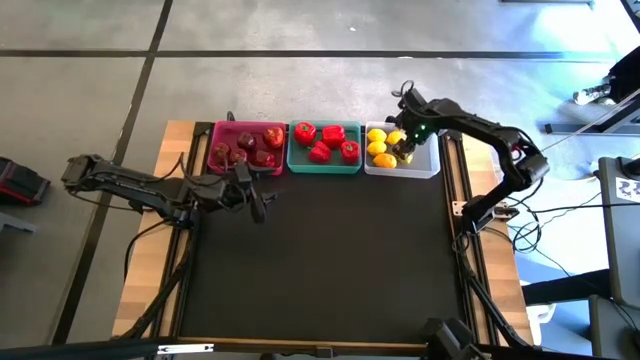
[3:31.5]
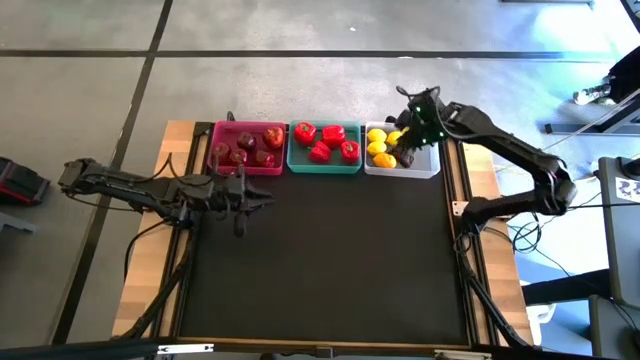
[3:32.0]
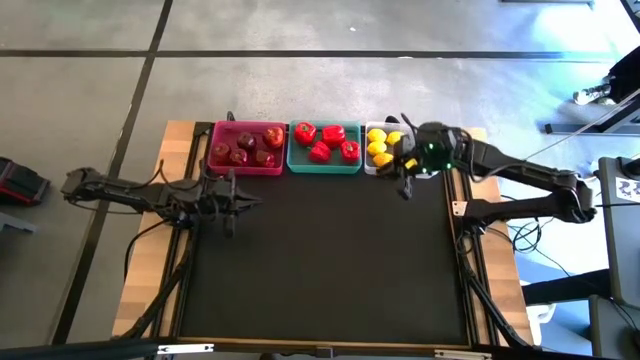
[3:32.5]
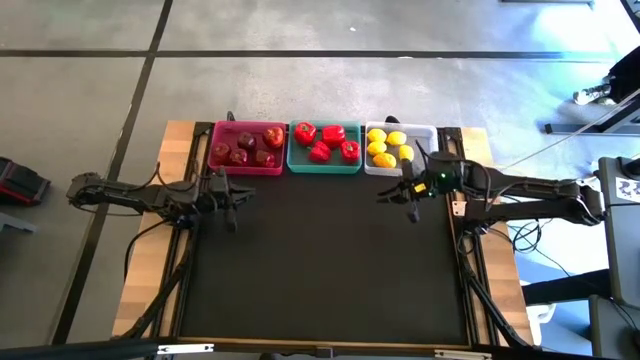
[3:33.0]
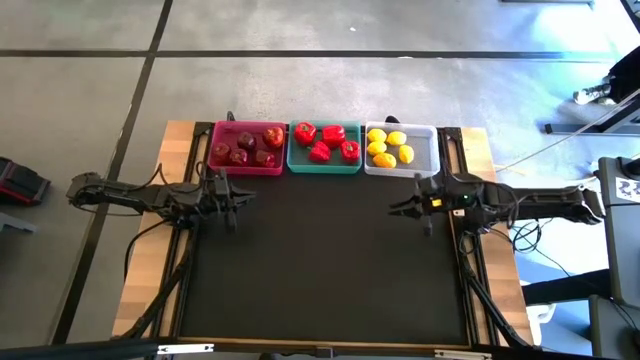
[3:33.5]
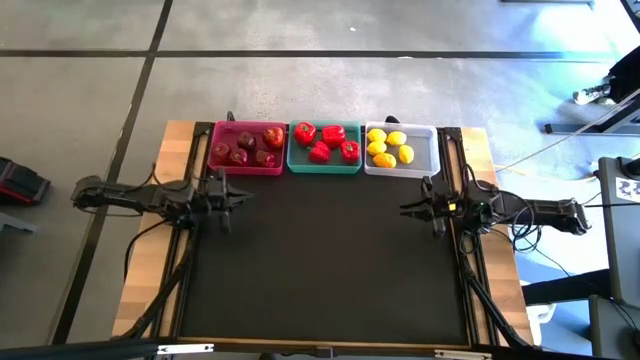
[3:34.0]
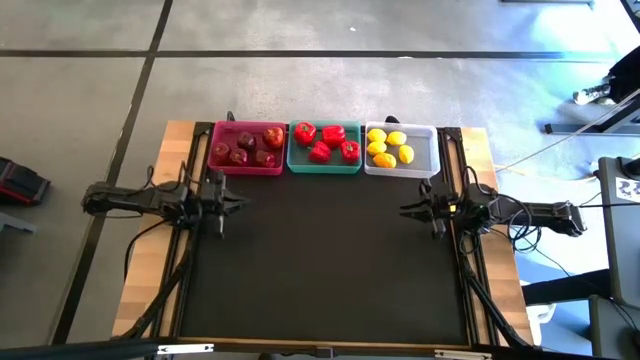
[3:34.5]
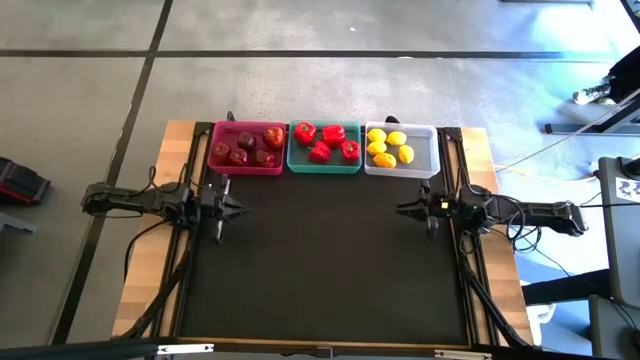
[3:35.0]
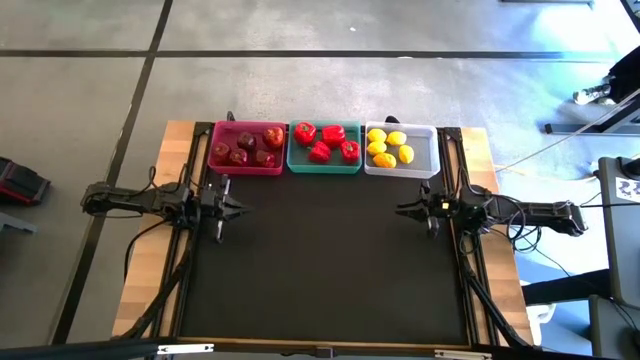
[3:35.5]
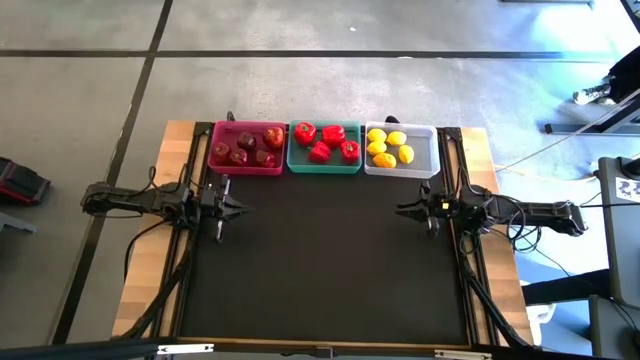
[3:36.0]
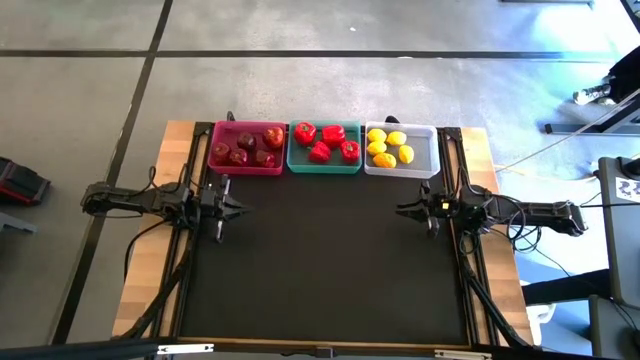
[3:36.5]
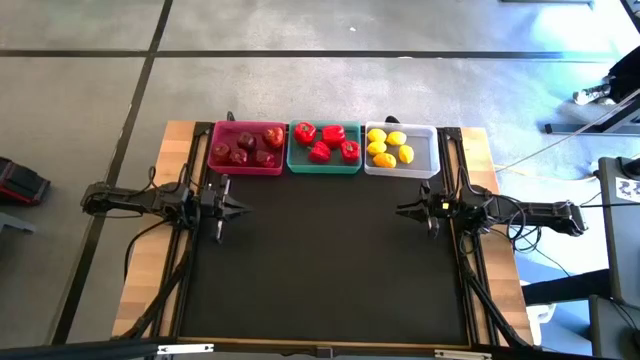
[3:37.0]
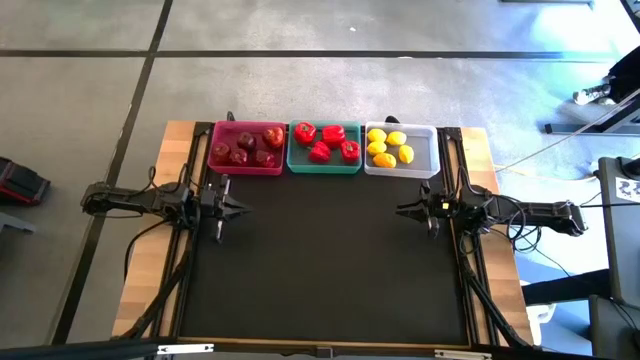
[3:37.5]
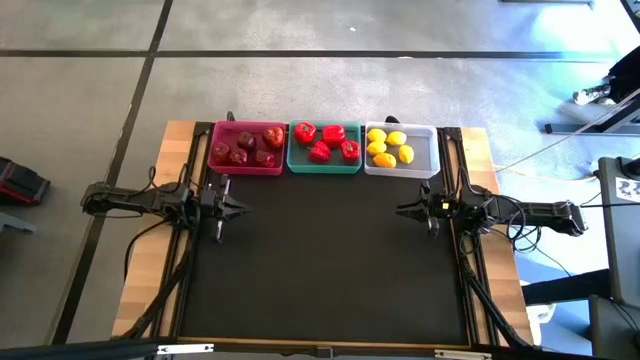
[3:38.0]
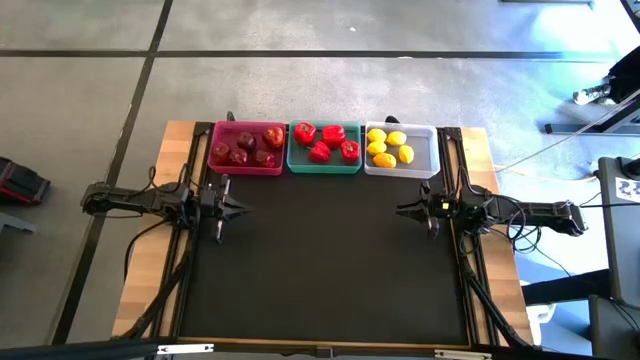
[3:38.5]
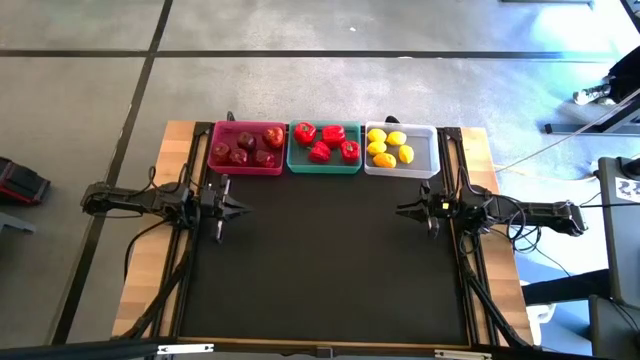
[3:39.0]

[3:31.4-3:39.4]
Task: Sort produce into baskets
Return to Home Position

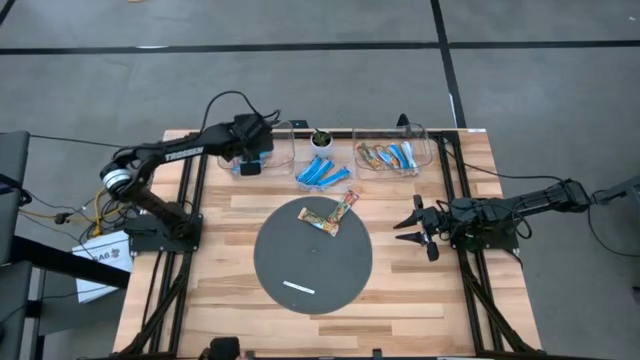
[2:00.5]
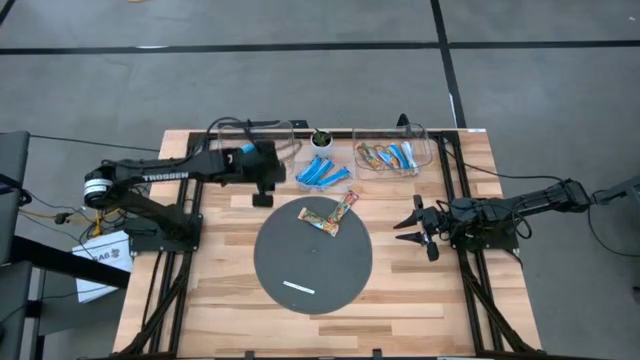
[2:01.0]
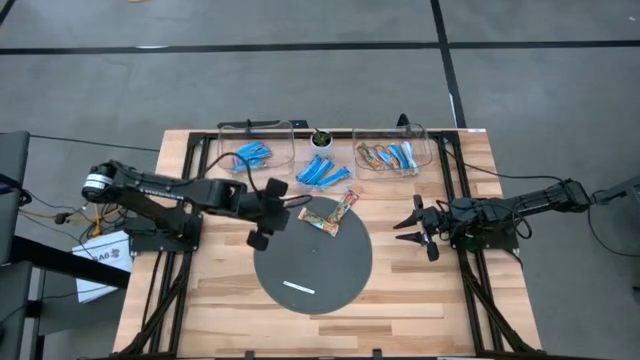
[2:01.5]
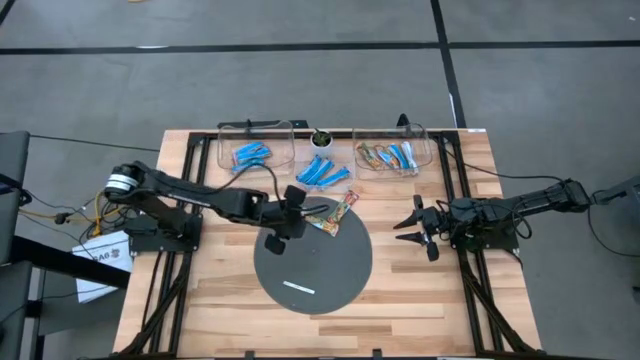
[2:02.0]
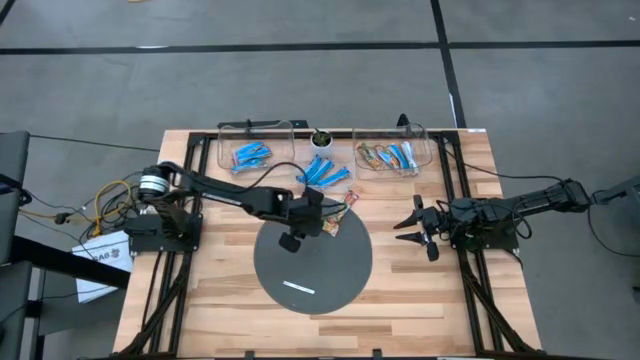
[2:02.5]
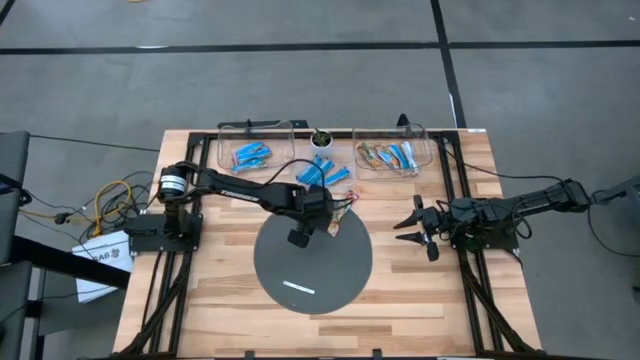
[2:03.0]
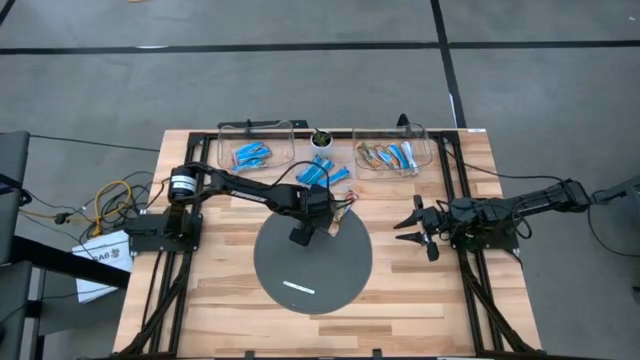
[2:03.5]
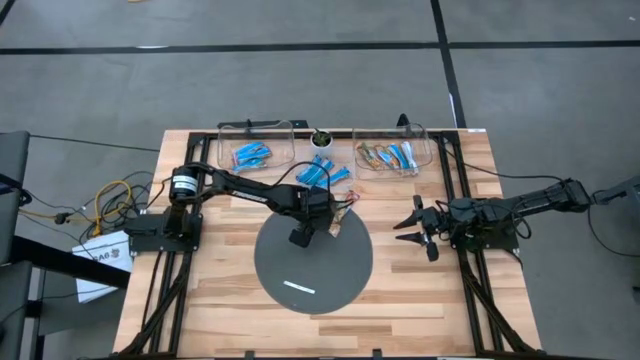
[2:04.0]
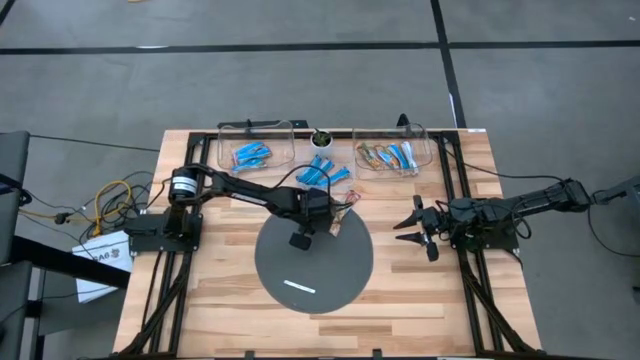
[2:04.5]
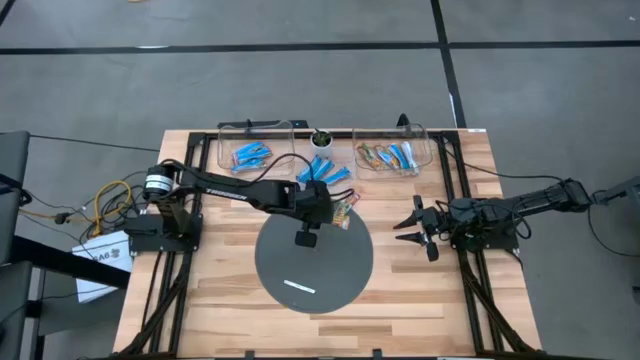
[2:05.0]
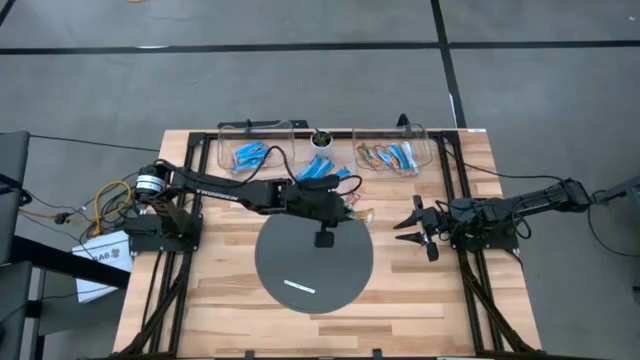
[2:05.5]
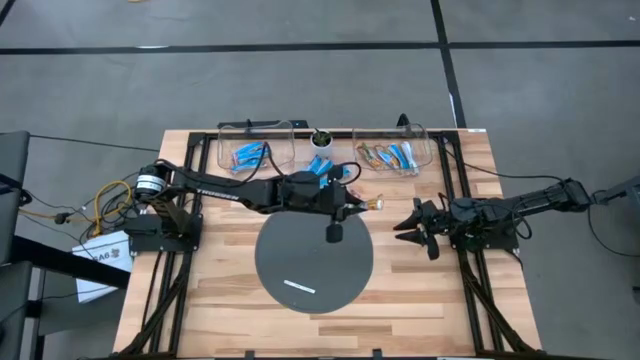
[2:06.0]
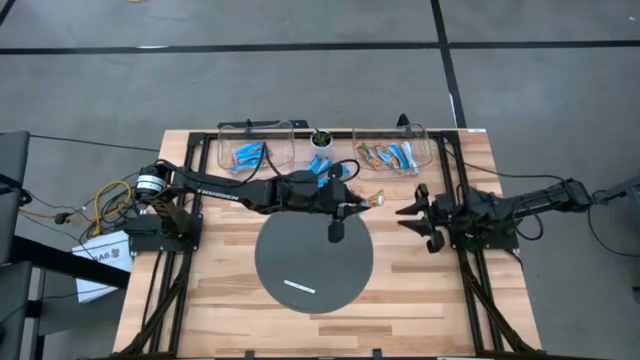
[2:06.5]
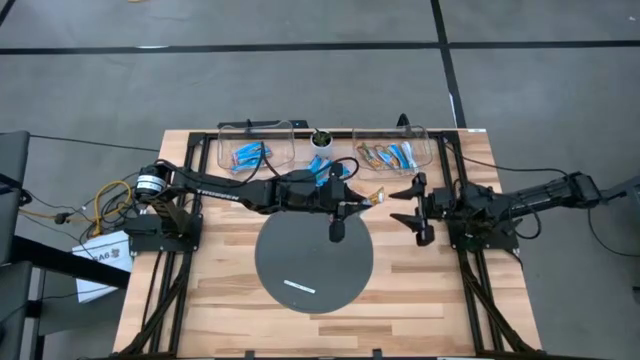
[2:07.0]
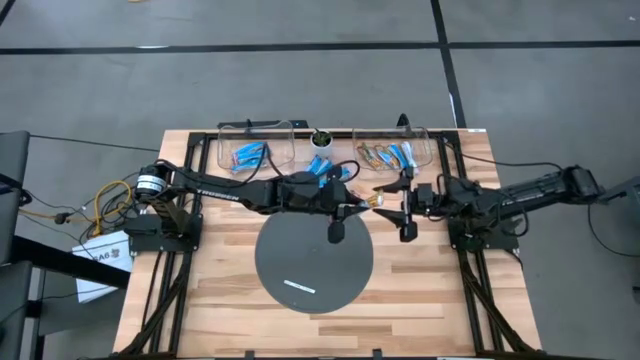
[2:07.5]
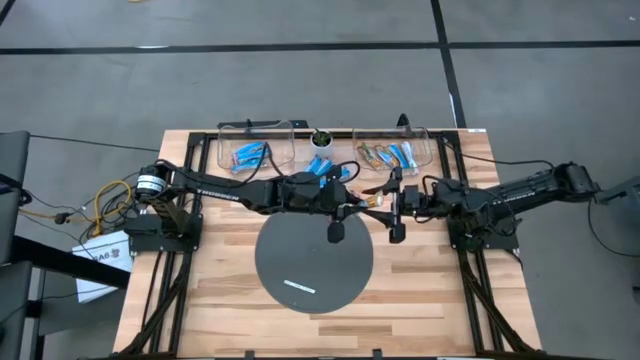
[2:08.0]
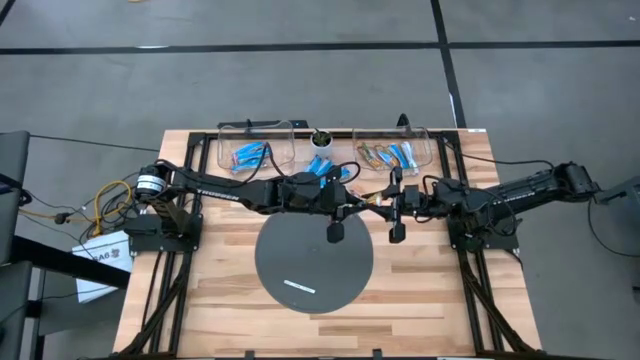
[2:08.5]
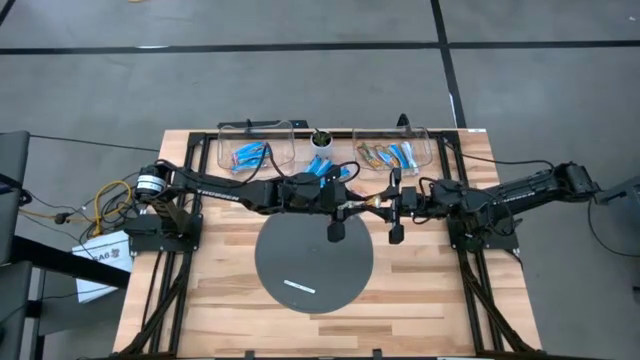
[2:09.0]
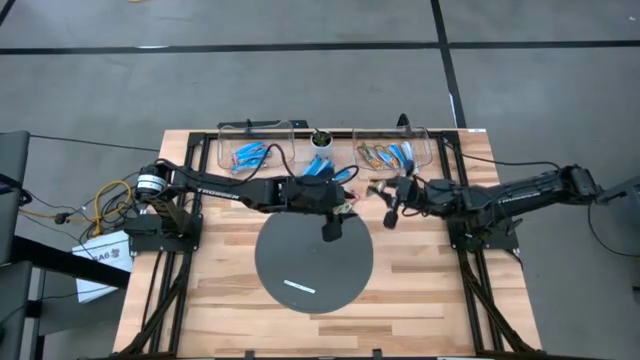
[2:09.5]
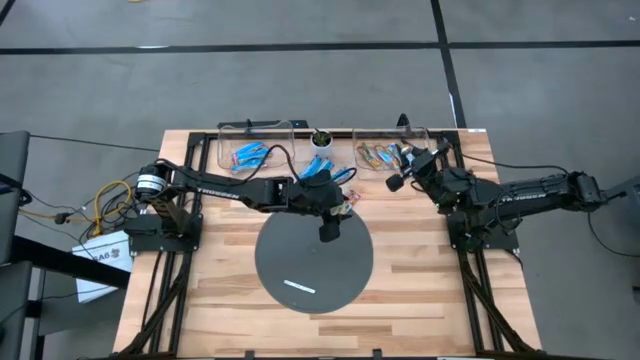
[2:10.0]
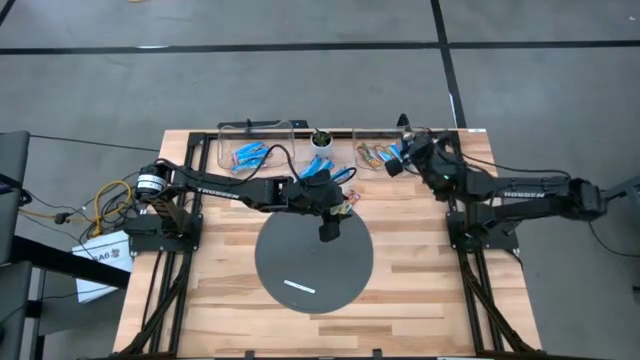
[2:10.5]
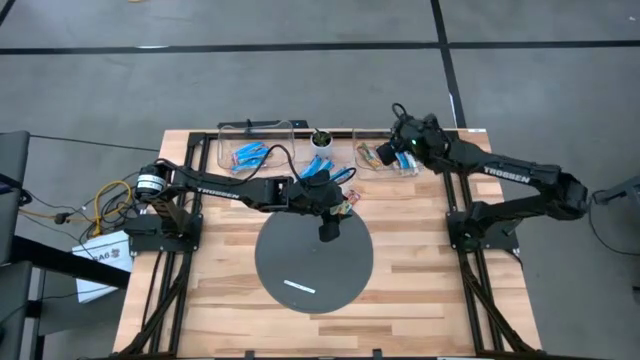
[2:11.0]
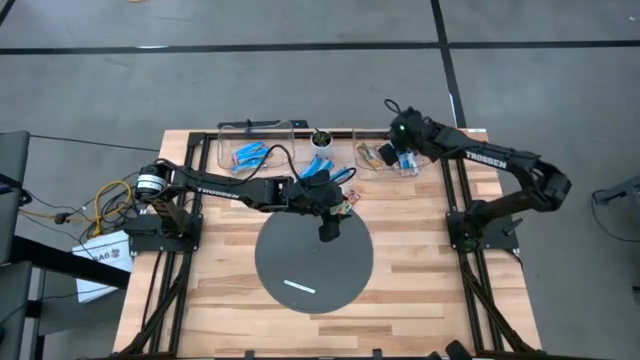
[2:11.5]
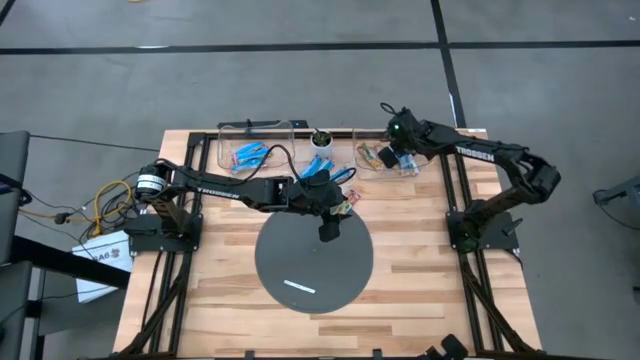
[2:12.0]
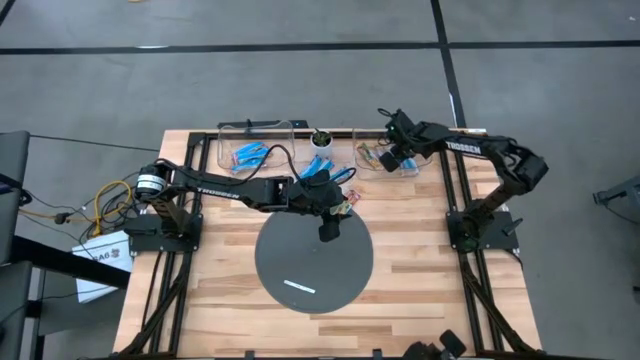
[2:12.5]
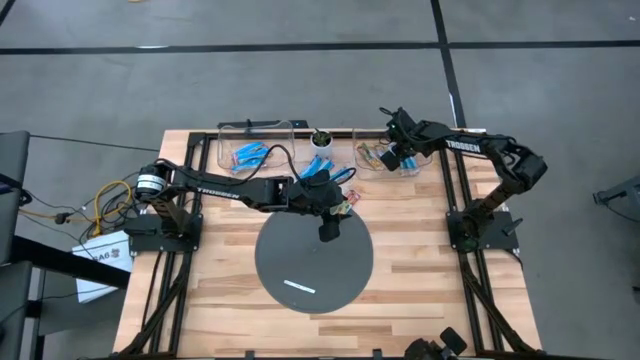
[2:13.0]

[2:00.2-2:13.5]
Task: Pick and place Granola Bars by type
Put the yellow granola bar into the right transparent bin
